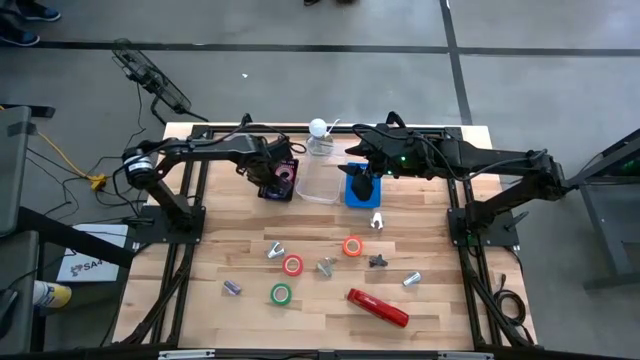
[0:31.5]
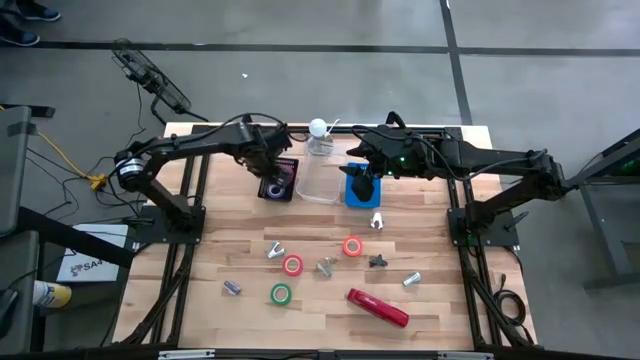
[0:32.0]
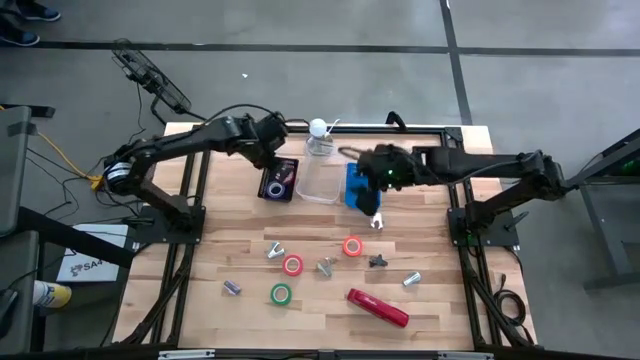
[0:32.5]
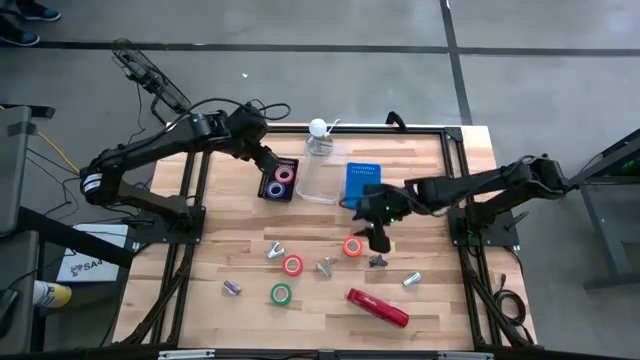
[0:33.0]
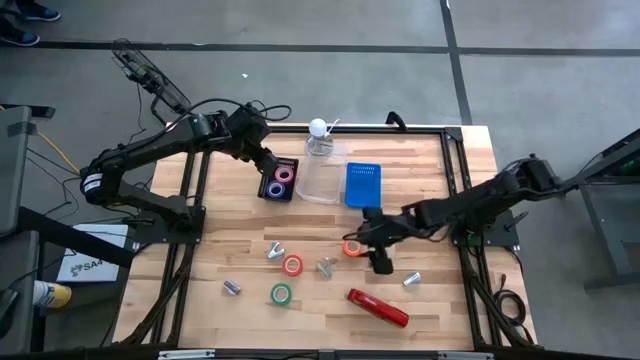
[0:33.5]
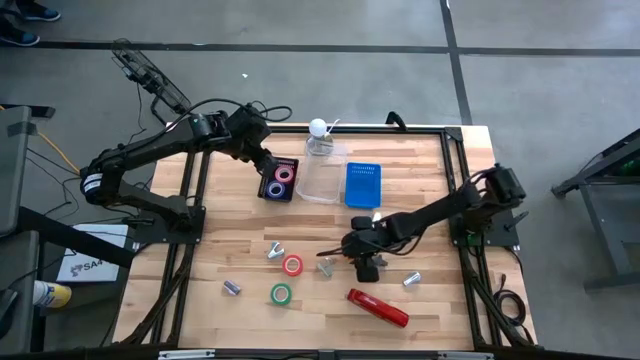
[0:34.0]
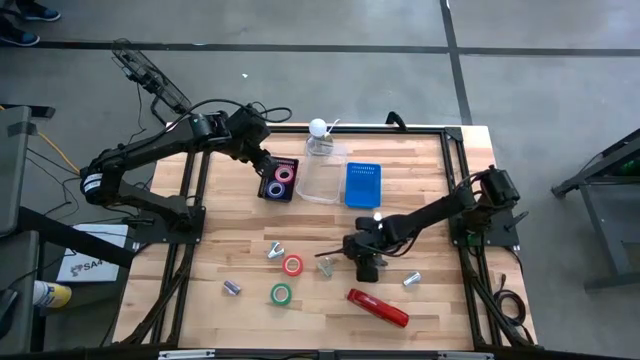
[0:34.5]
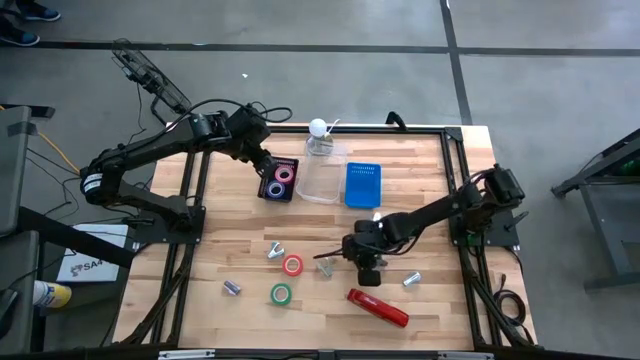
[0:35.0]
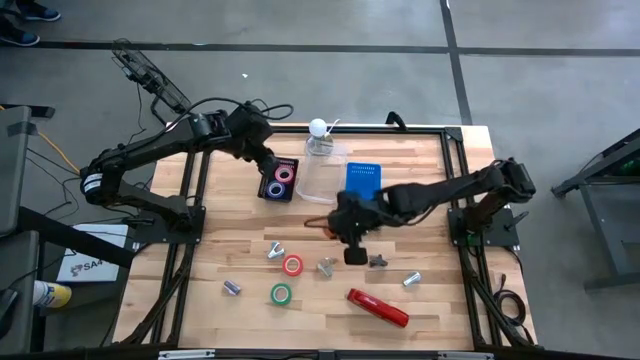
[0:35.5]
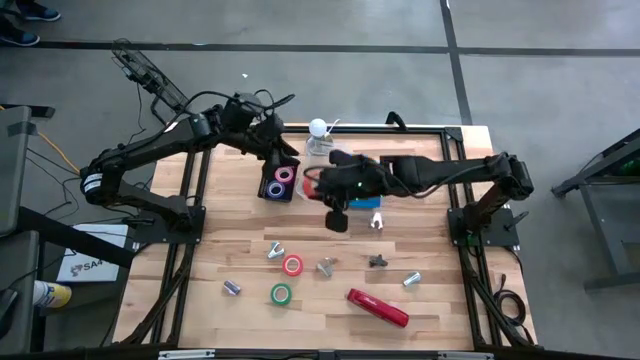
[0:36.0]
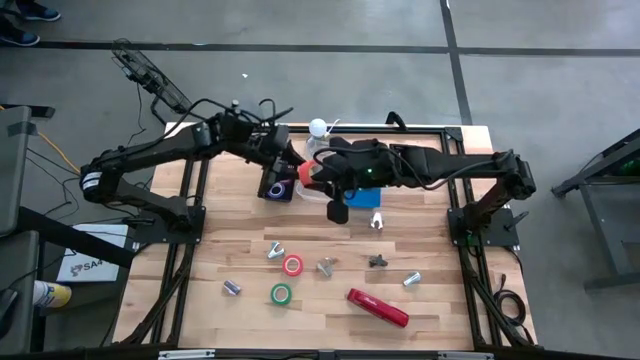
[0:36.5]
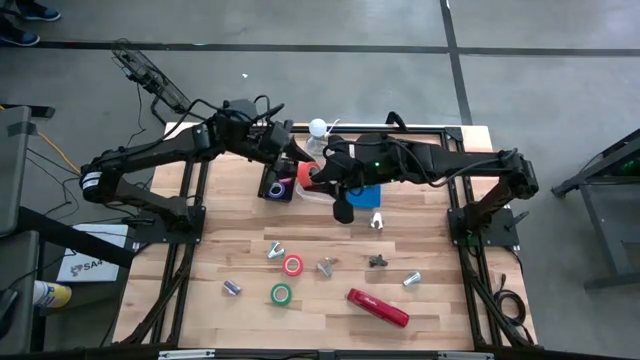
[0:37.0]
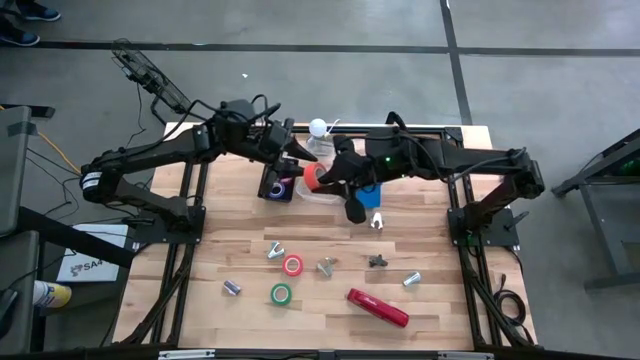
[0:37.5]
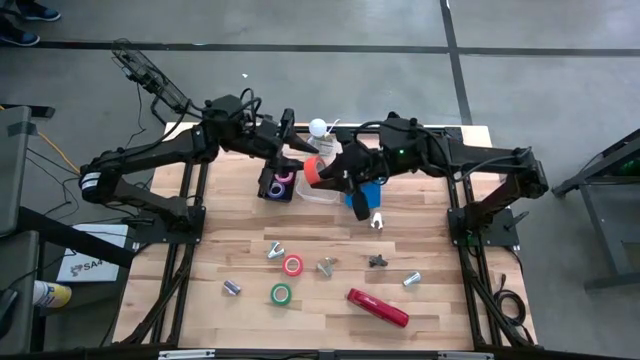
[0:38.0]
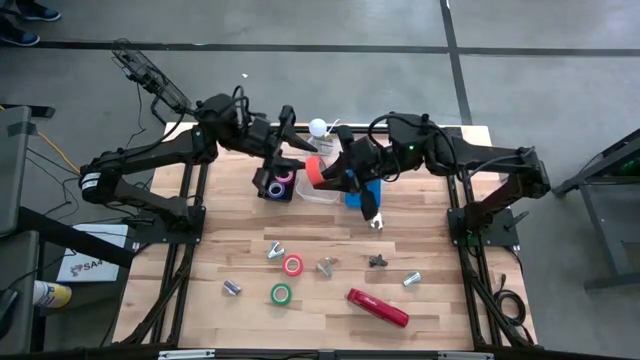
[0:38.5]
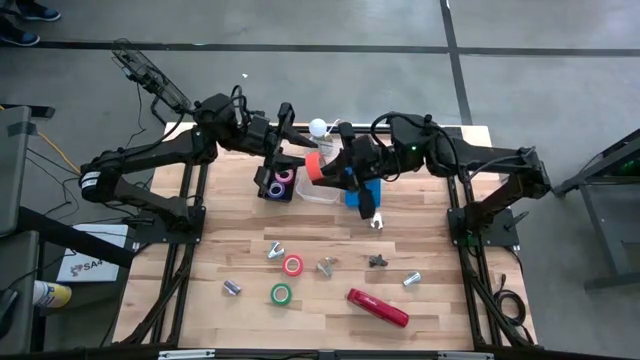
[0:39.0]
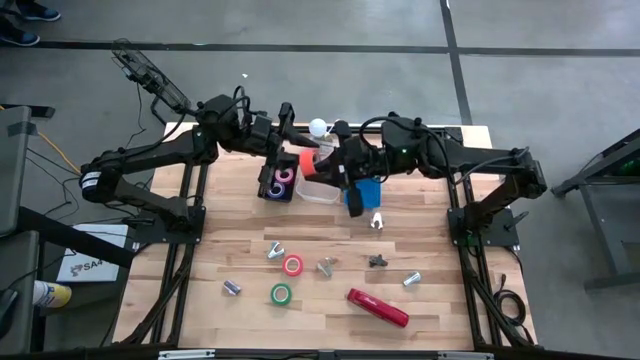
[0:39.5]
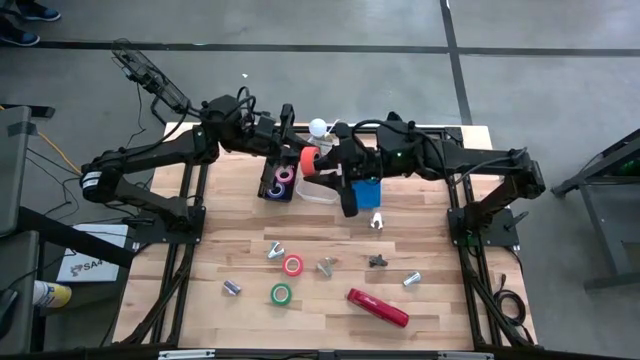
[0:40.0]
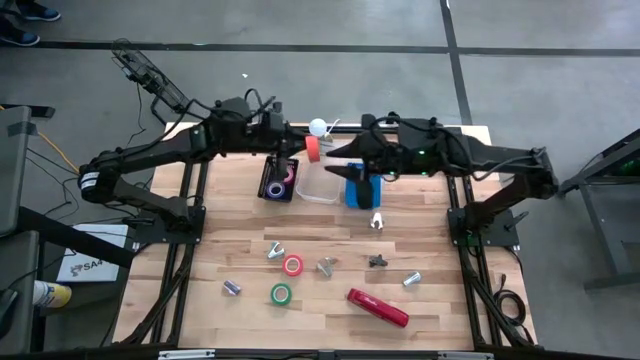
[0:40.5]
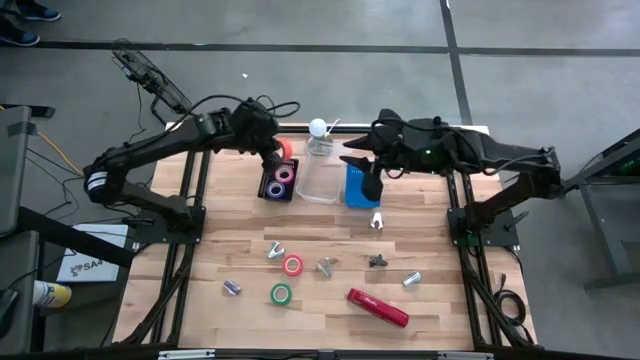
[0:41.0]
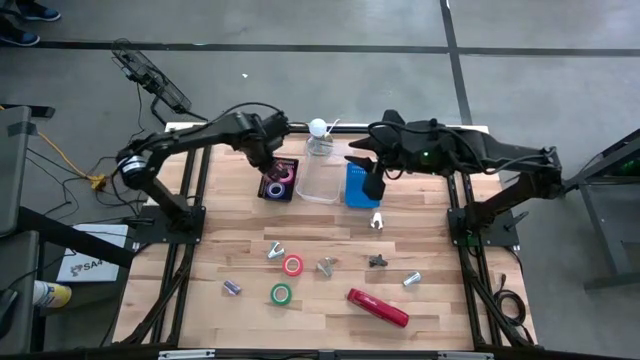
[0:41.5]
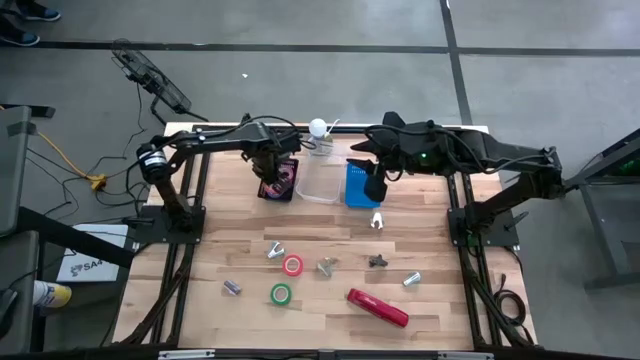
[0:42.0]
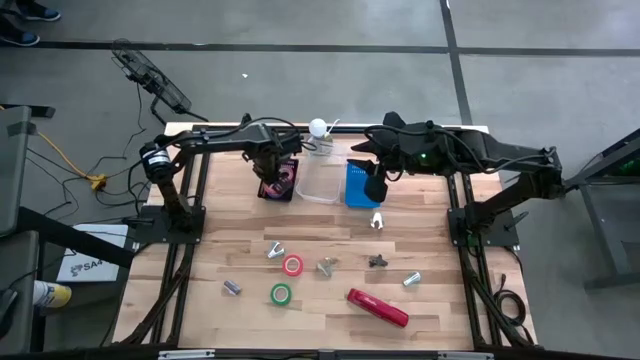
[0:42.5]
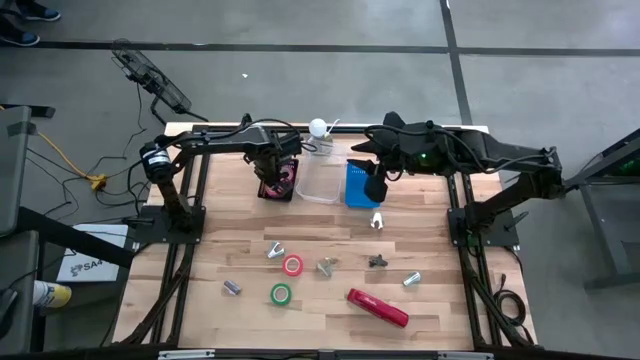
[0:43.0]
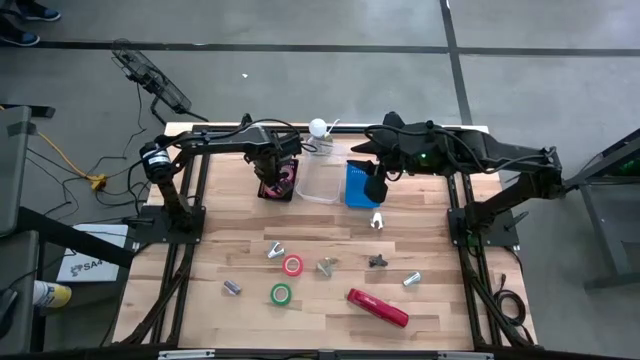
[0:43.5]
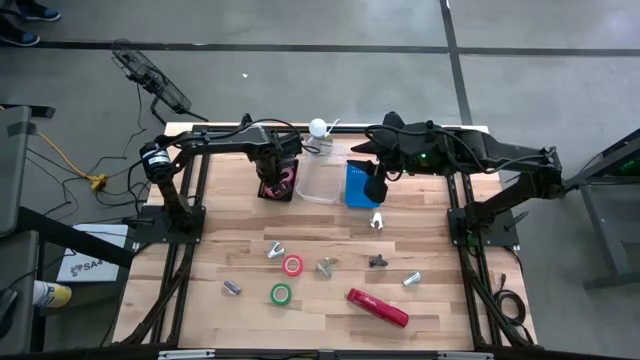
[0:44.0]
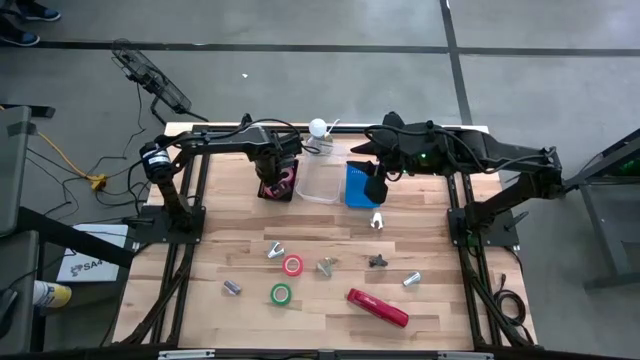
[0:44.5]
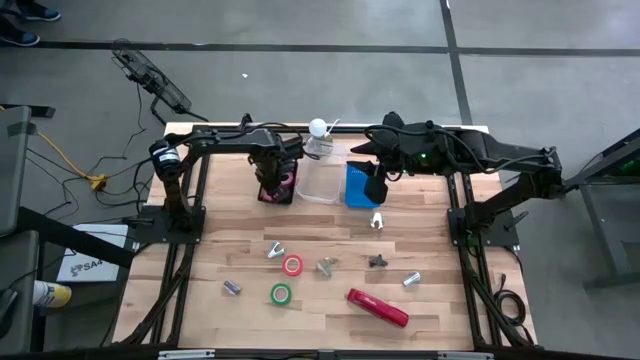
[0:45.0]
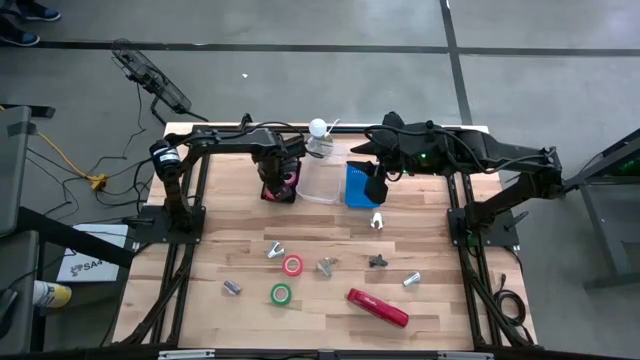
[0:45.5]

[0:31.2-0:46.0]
Task: Pick and place Stapler, Stapler remover, tape
Put the orange tape into the black basket

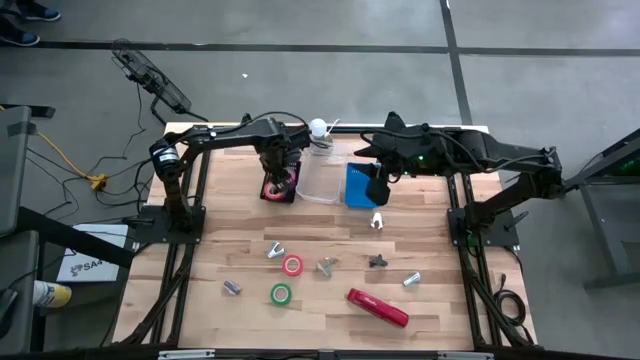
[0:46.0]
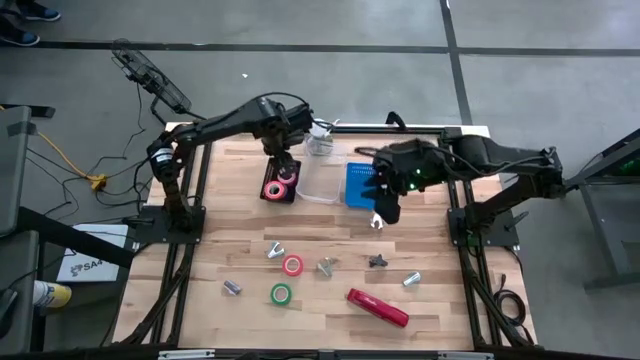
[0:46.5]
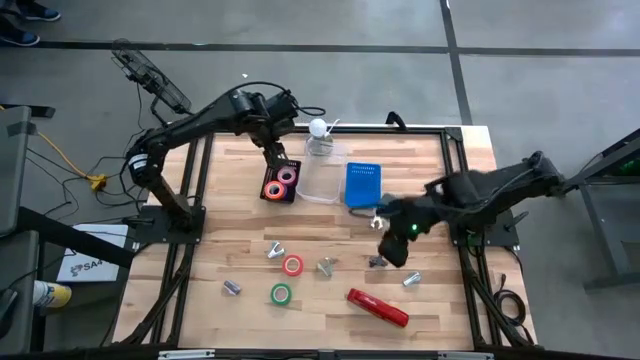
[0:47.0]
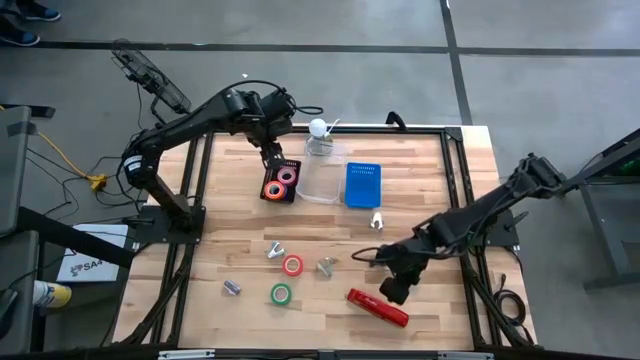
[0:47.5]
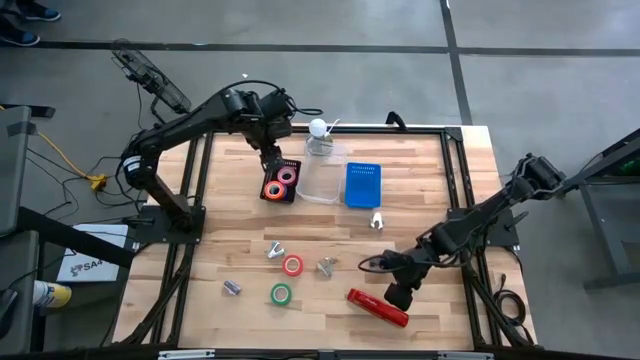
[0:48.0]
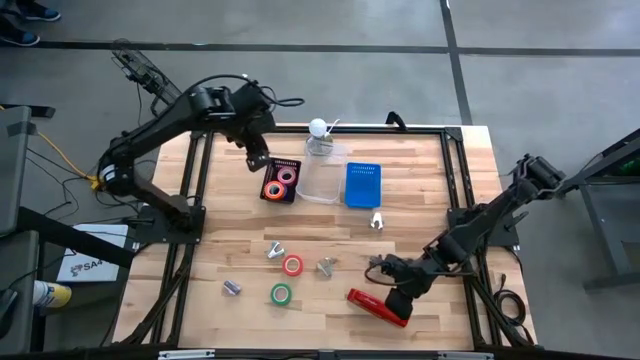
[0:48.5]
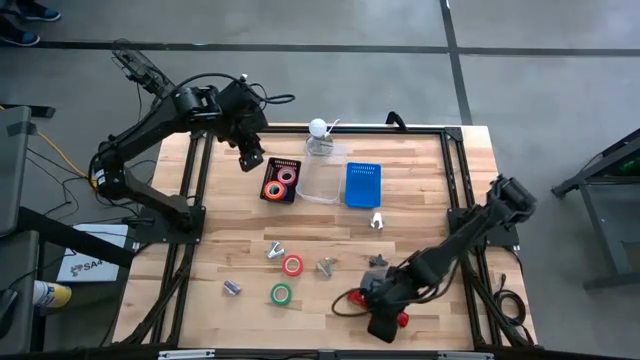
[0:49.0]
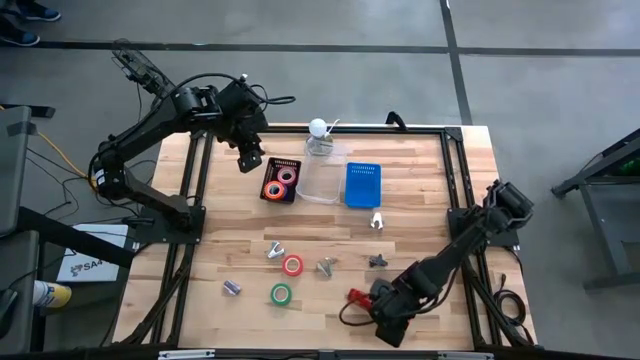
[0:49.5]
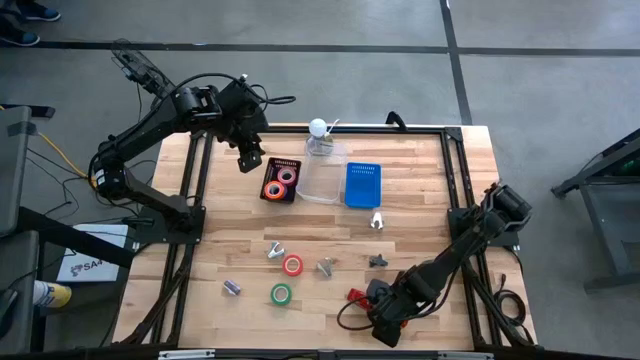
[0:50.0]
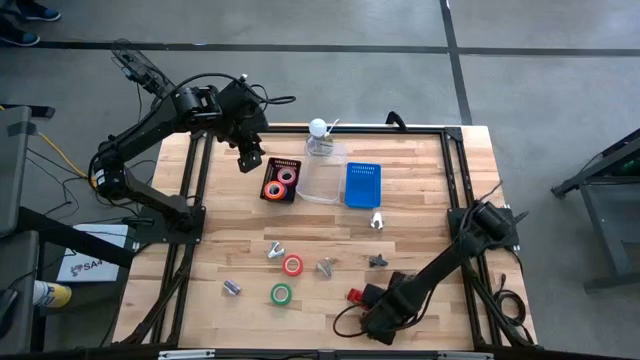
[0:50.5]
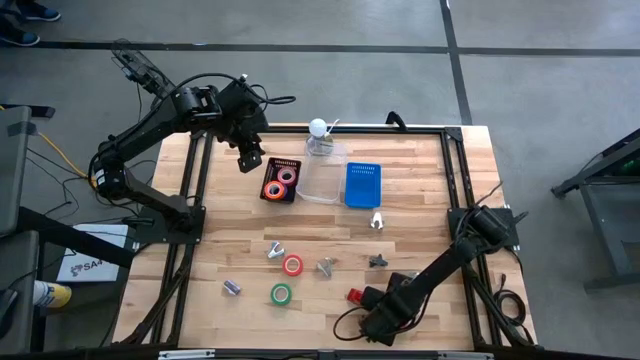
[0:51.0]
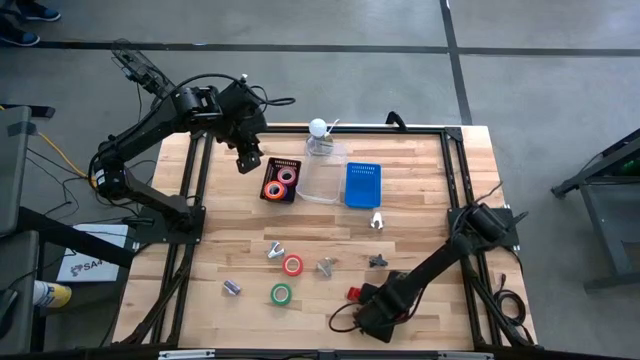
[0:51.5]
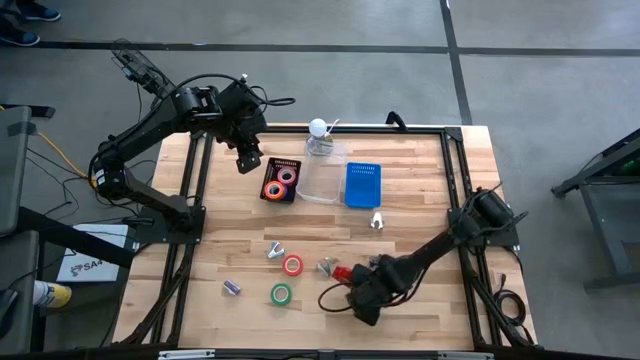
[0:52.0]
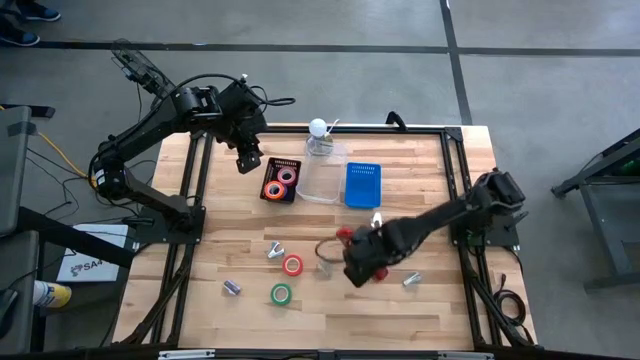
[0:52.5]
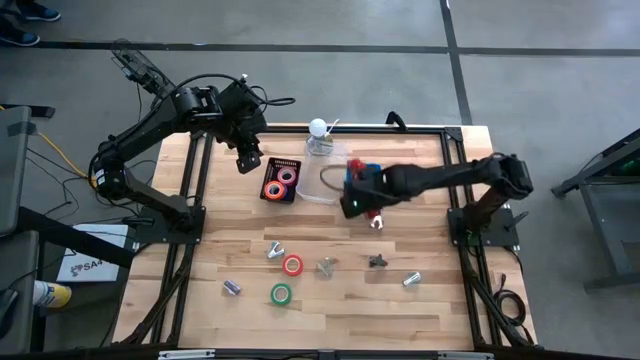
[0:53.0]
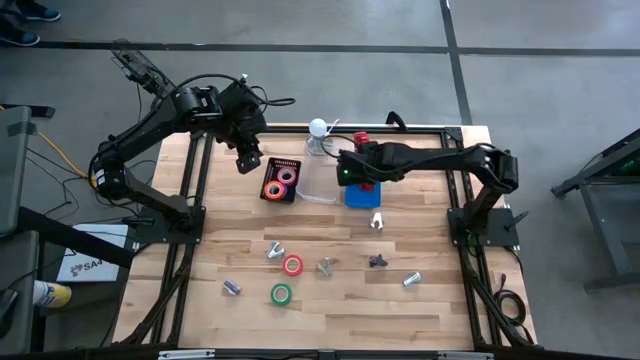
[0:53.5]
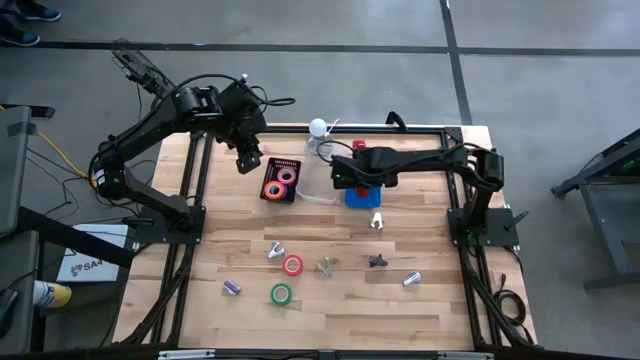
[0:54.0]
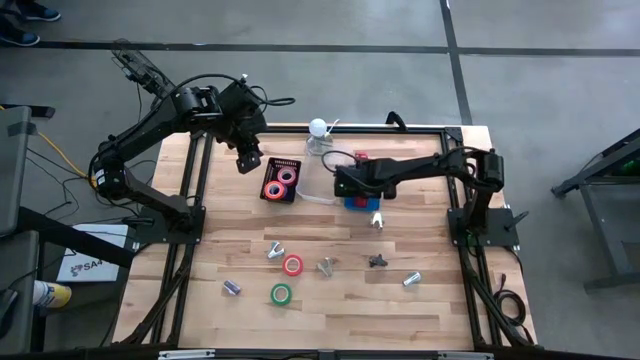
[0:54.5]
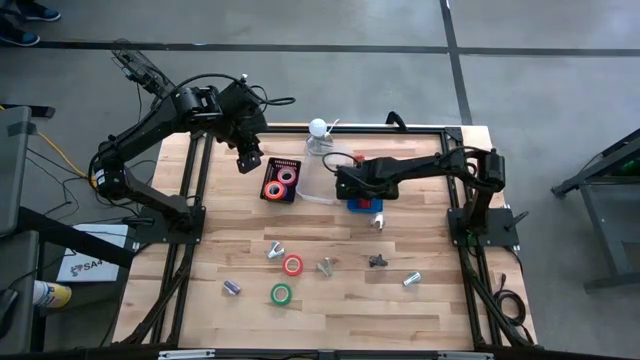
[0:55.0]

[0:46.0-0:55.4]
Put the red stapler into the blue basket
